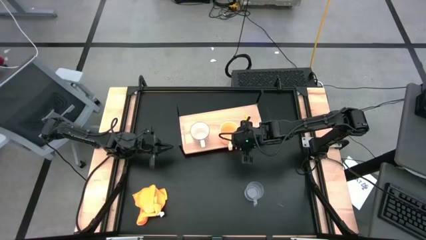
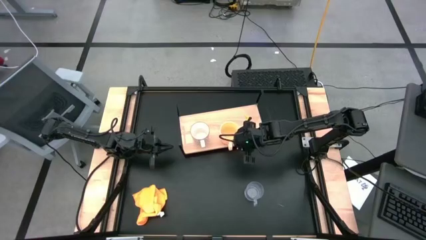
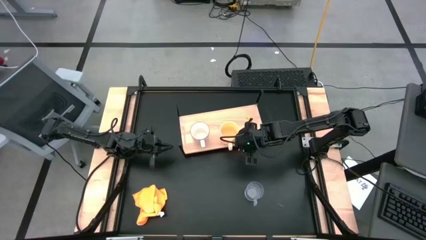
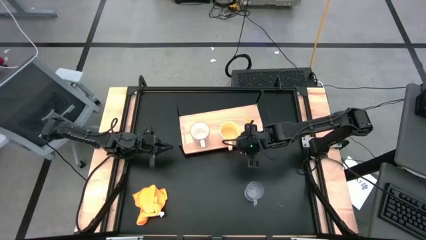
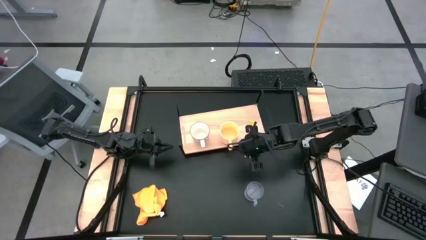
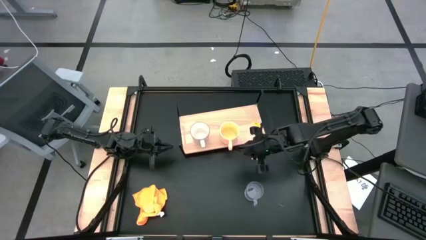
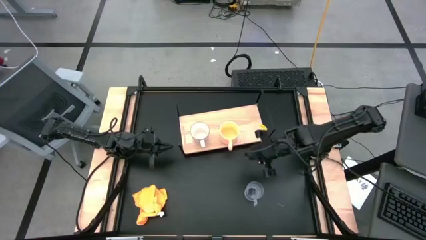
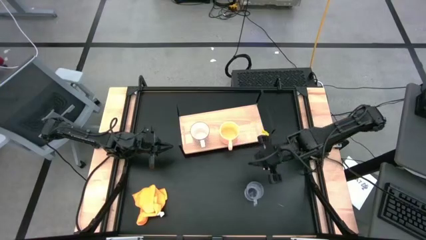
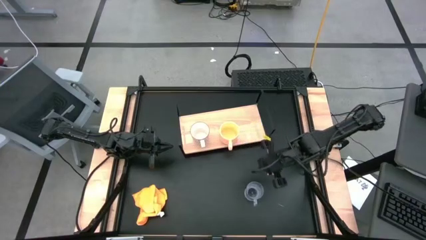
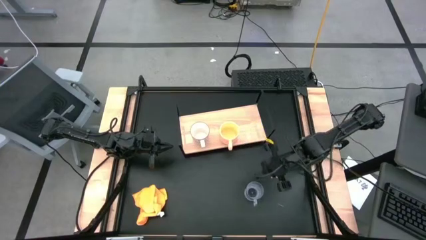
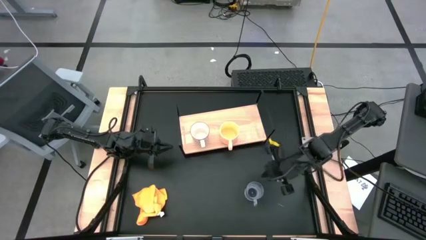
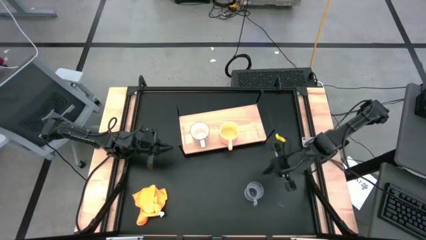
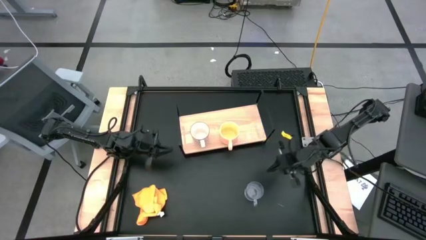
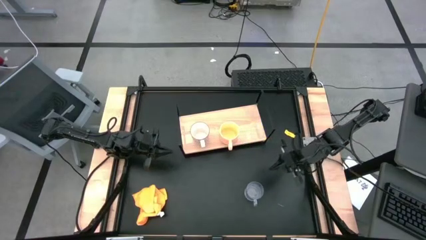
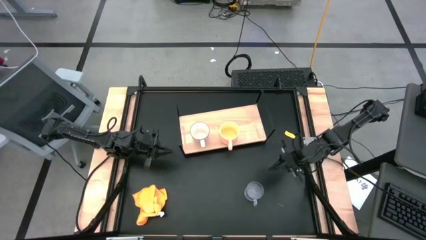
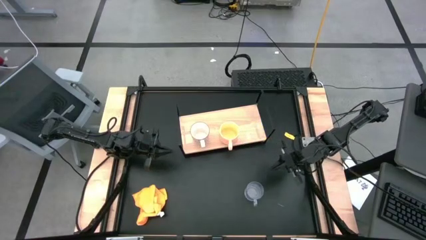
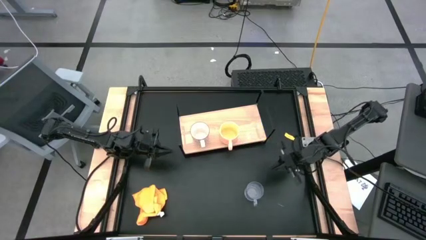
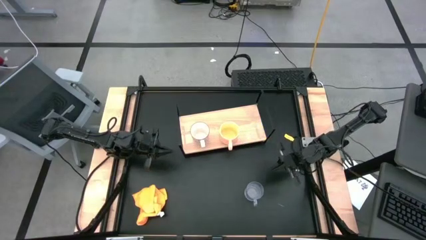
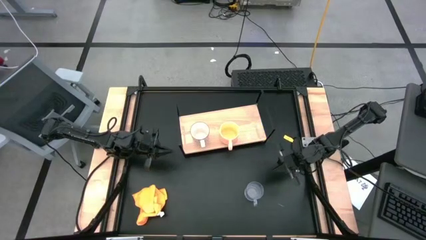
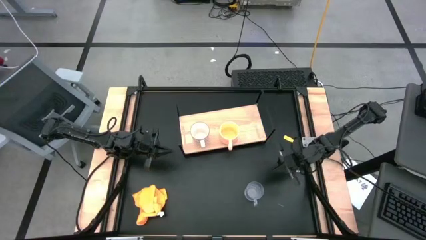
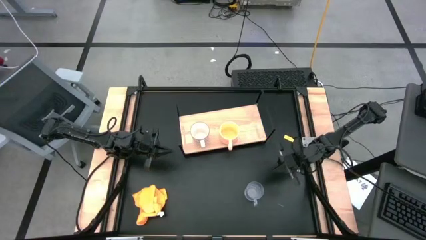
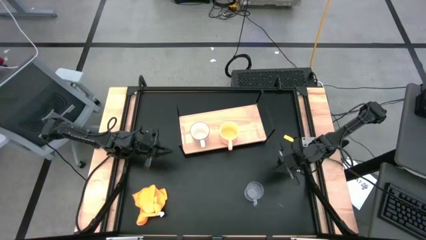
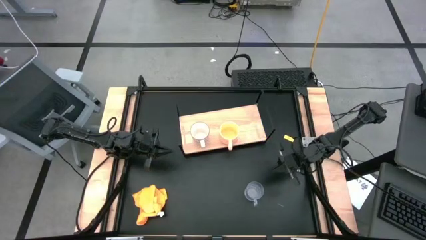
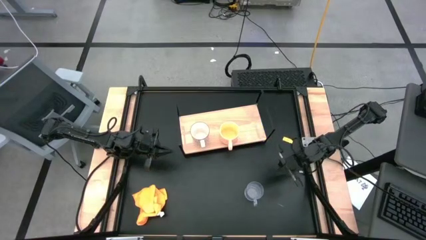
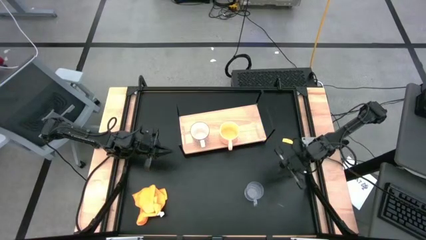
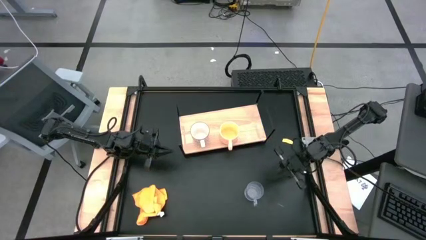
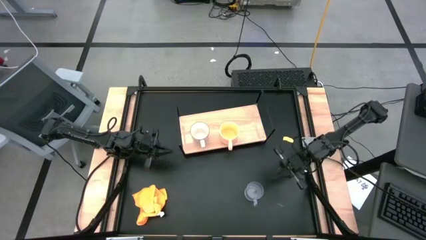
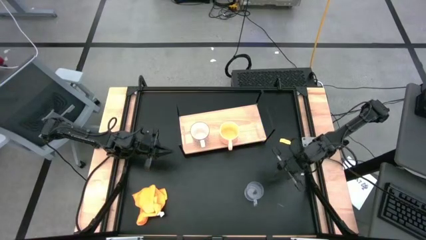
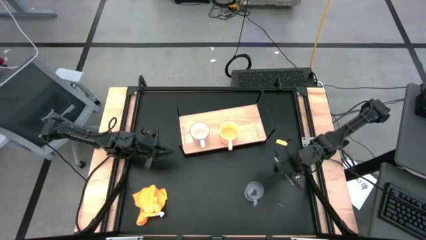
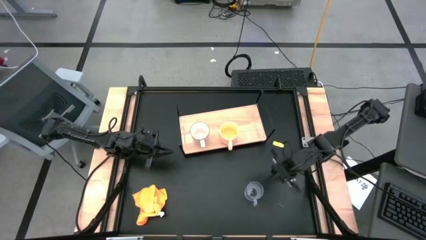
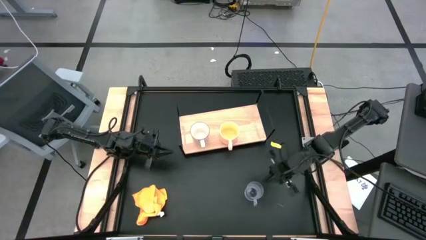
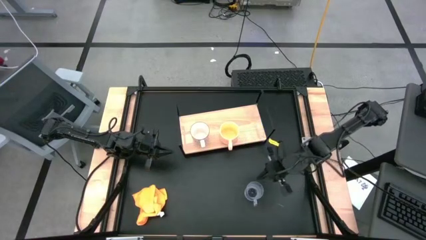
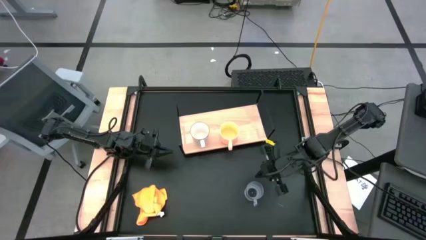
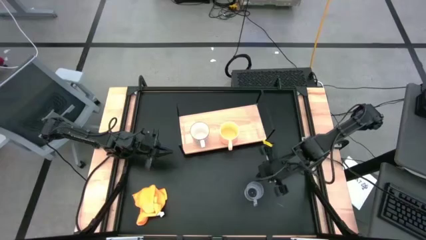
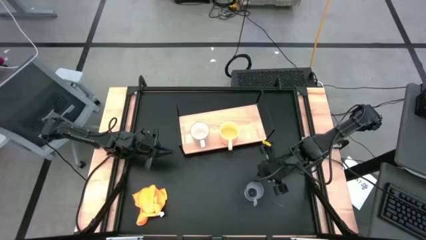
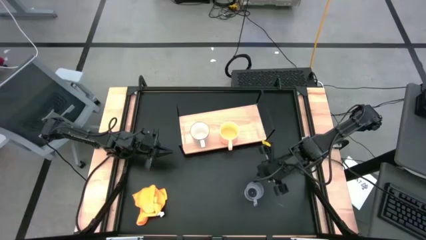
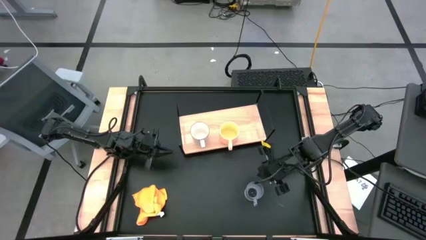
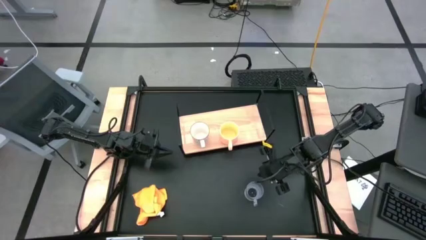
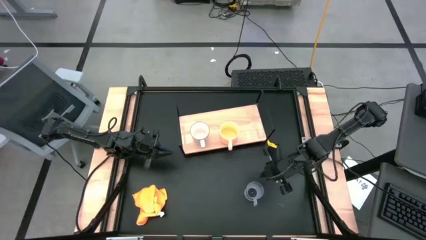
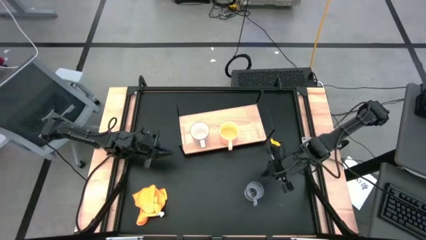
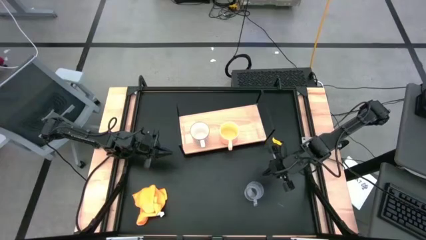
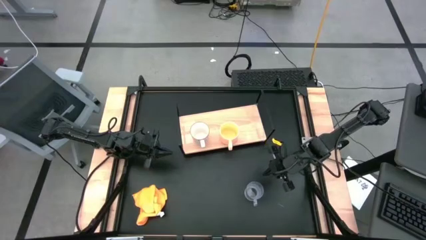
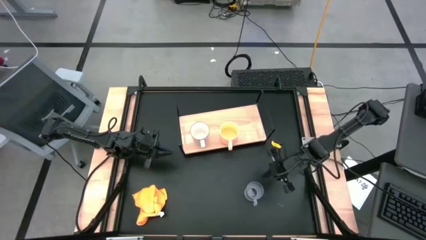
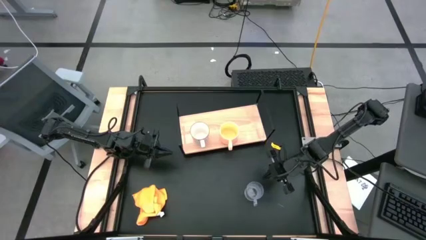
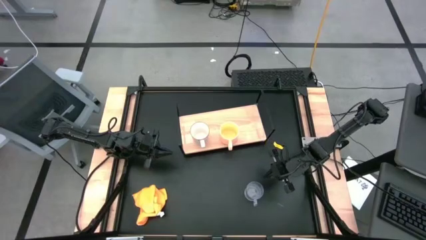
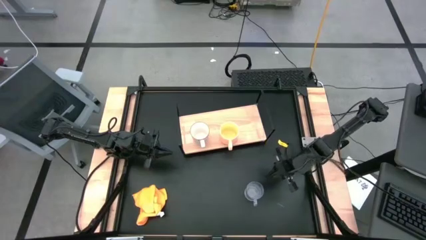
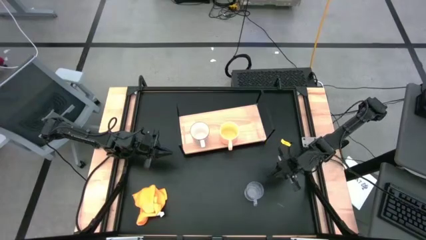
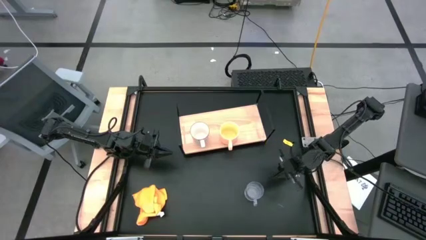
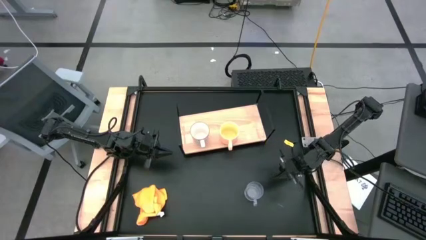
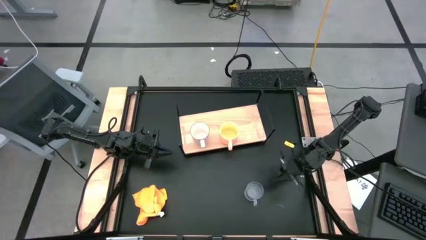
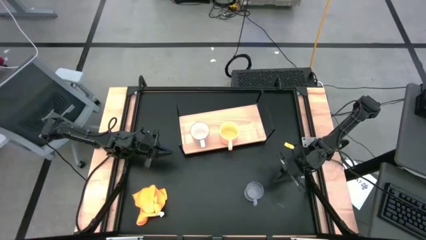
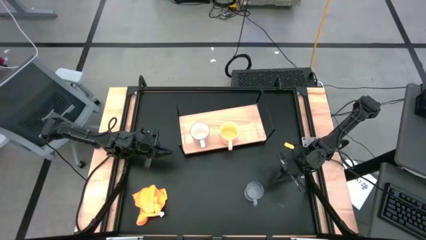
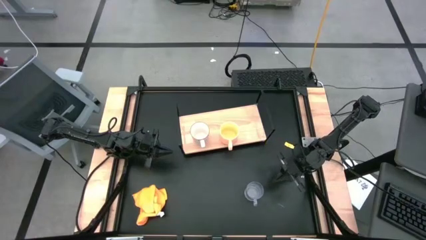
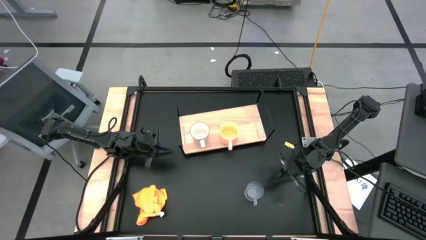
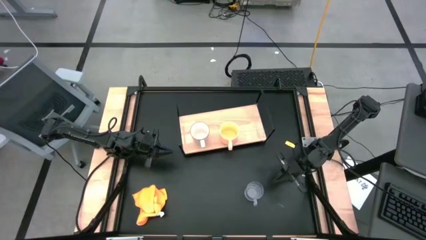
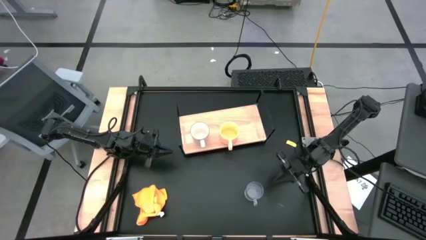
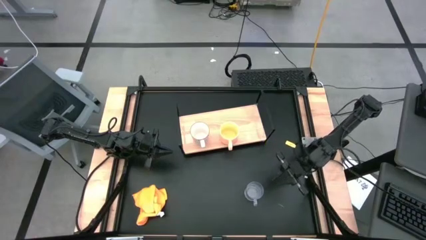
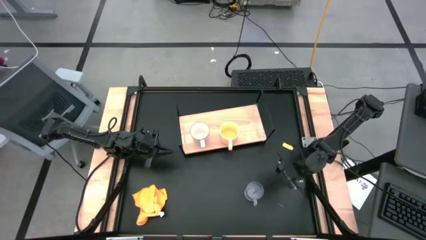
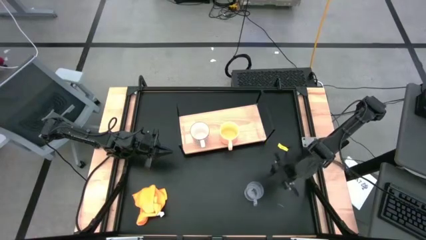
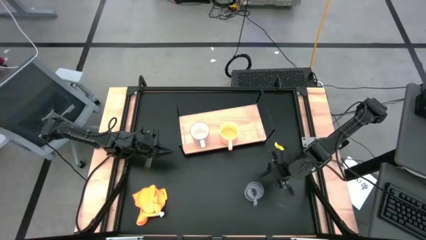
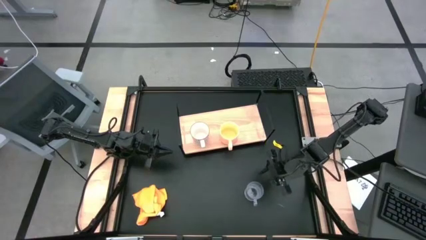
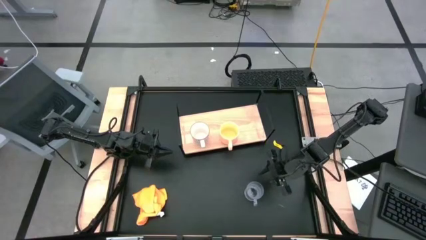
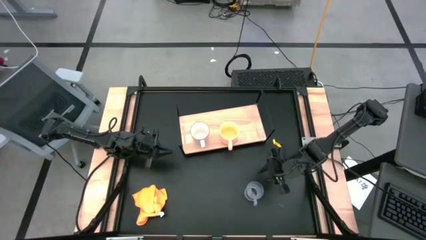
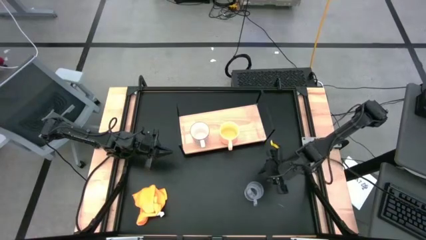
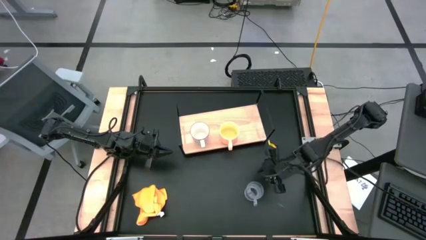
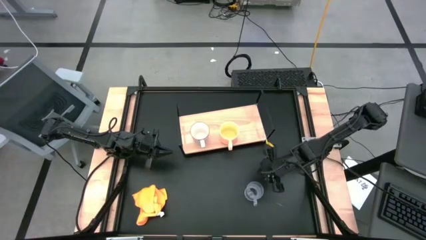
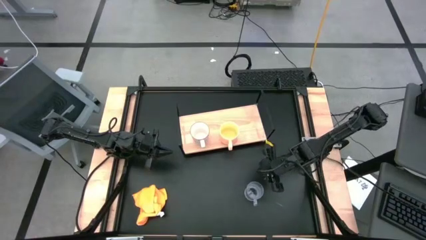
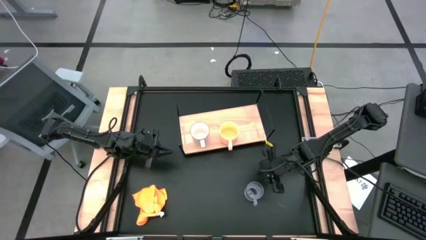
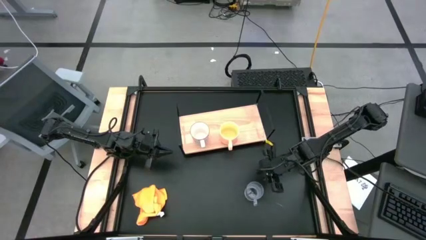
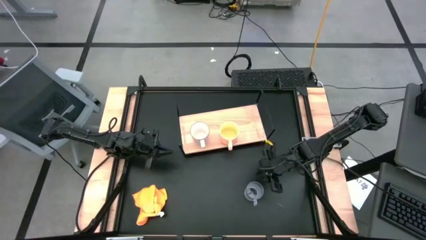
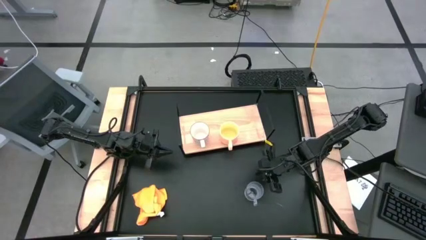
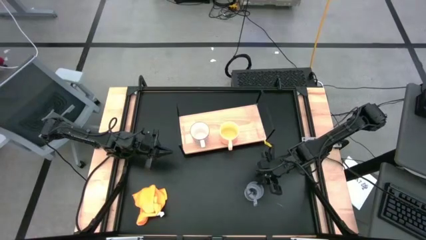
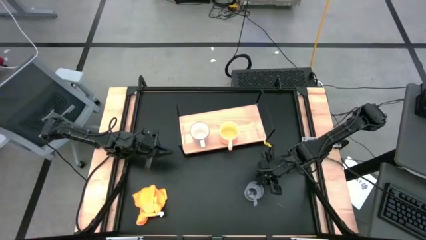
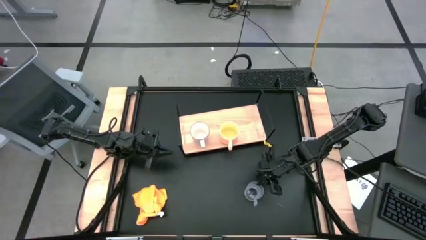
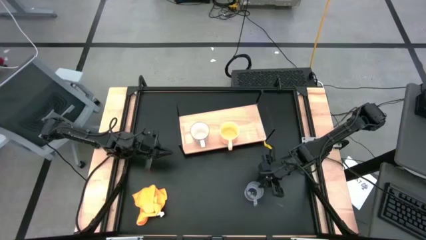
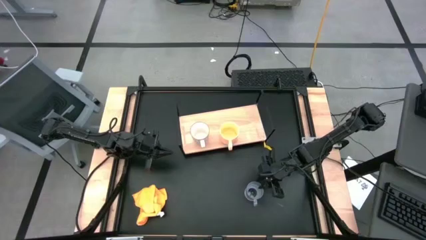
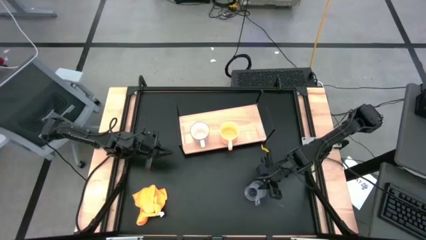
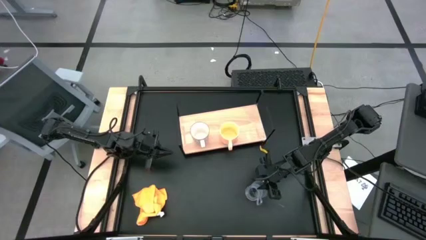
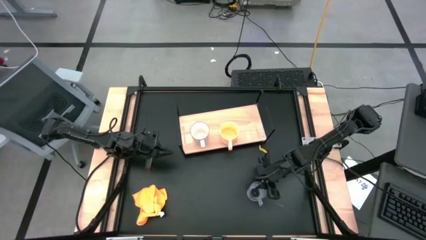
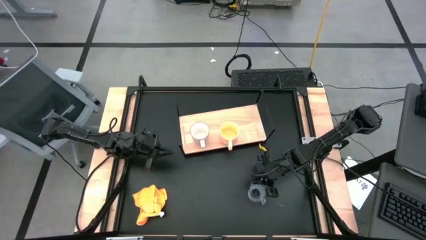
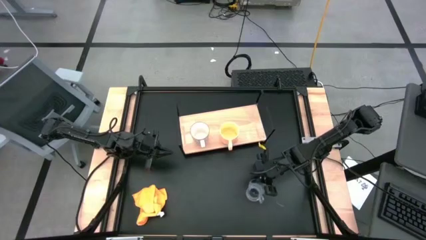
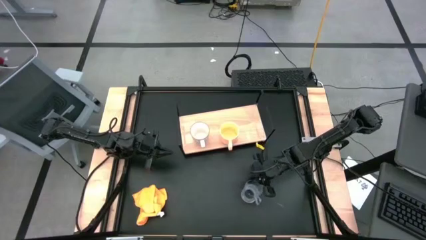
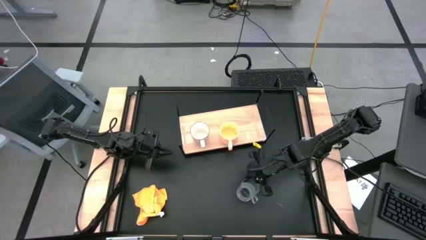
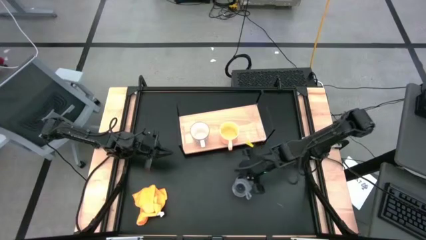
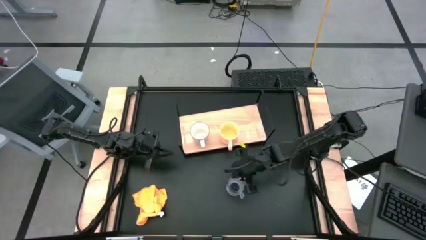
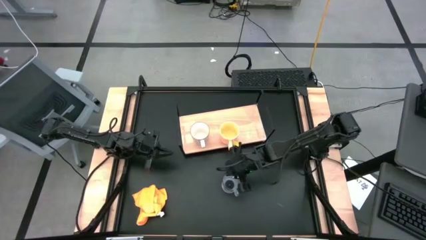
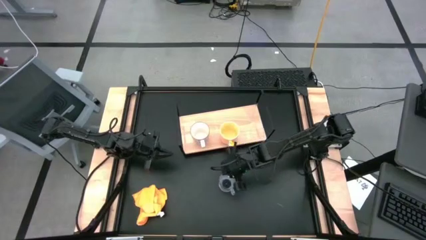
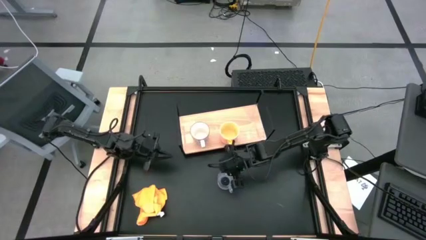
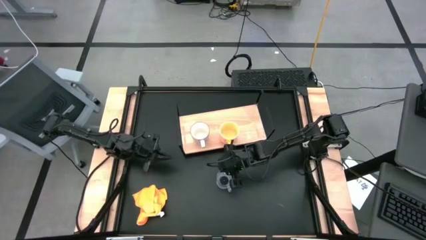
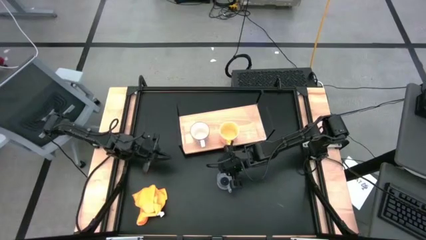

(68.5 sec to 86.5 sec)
Task: Stack small to large cups/mugs on shelf
Put the transparent mug on the shelf
